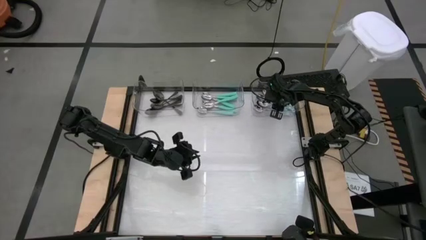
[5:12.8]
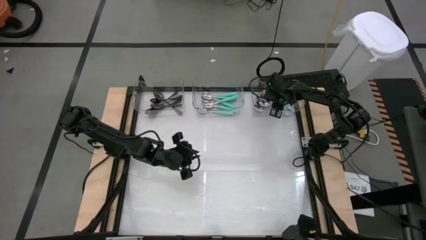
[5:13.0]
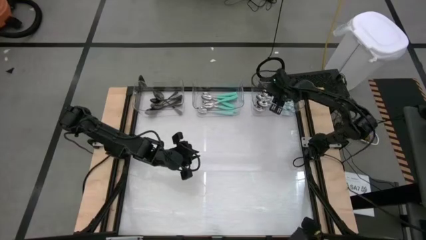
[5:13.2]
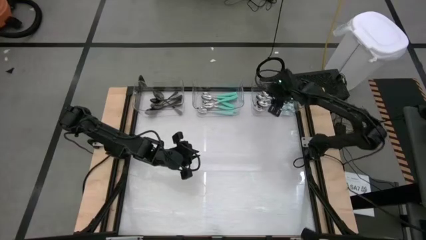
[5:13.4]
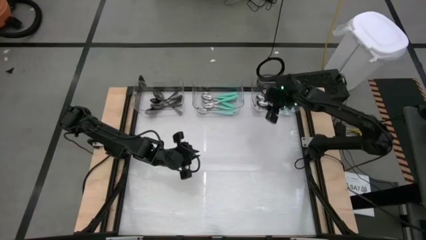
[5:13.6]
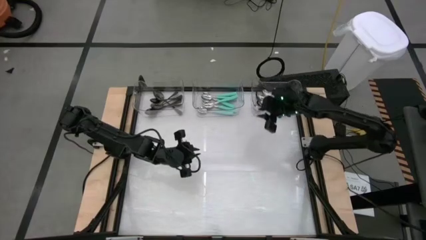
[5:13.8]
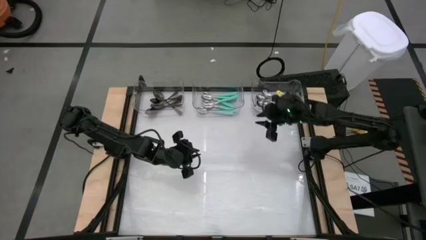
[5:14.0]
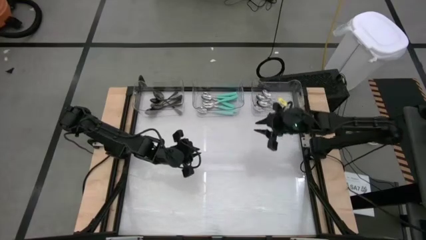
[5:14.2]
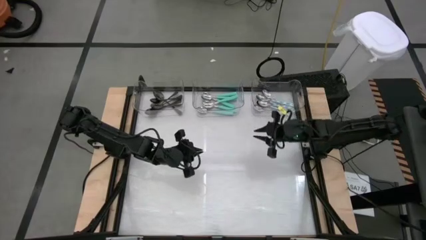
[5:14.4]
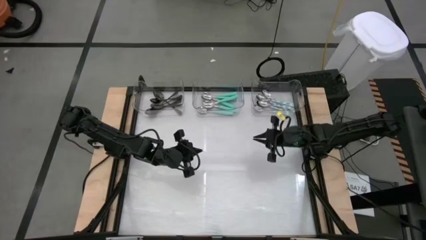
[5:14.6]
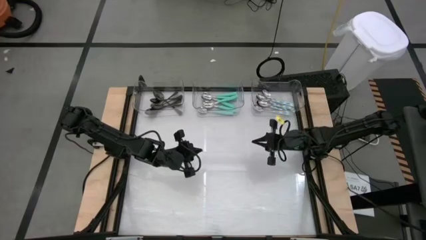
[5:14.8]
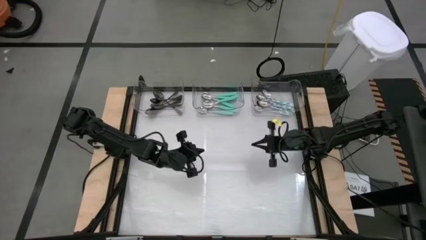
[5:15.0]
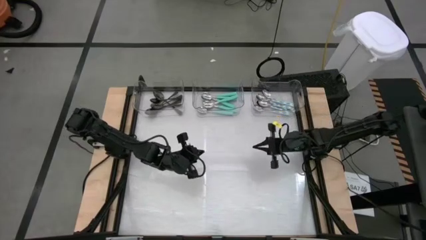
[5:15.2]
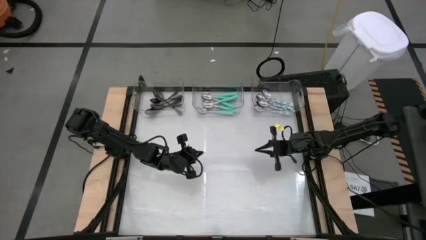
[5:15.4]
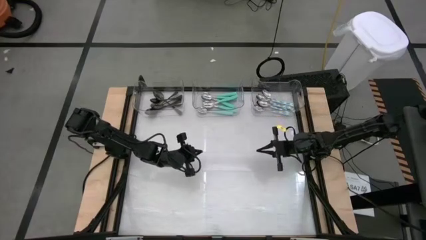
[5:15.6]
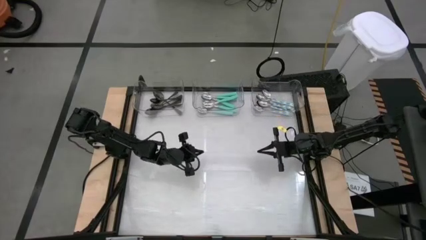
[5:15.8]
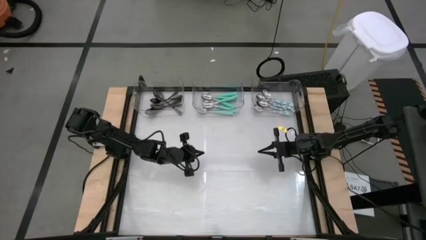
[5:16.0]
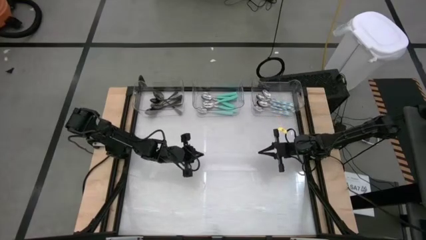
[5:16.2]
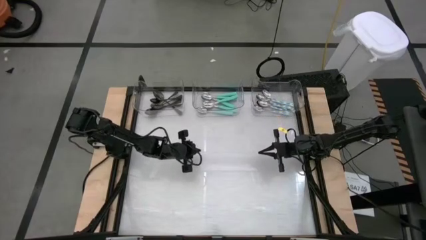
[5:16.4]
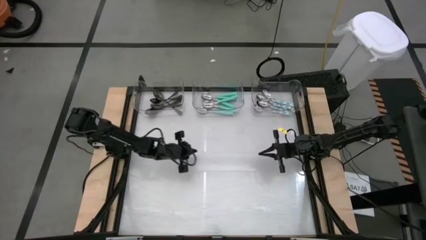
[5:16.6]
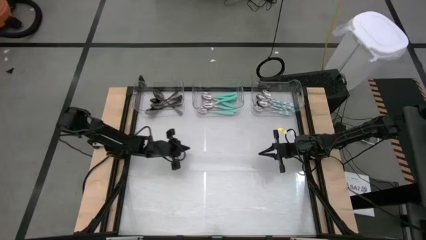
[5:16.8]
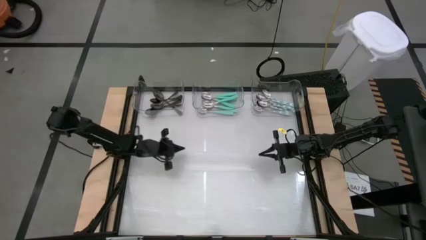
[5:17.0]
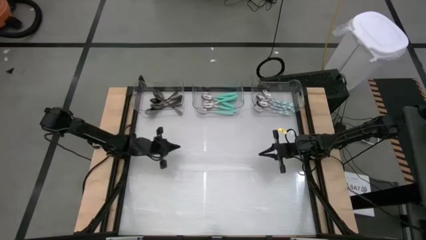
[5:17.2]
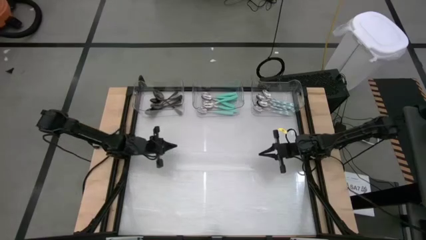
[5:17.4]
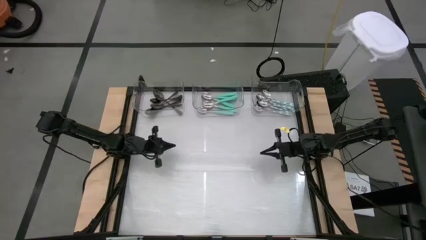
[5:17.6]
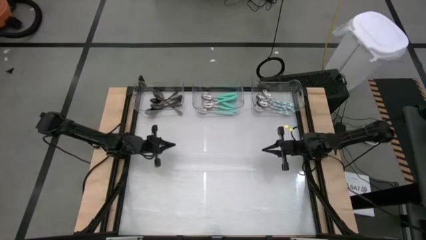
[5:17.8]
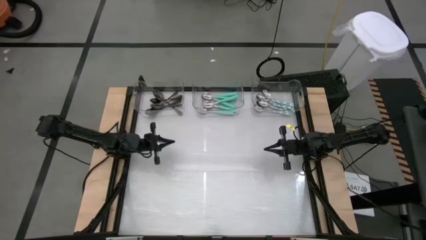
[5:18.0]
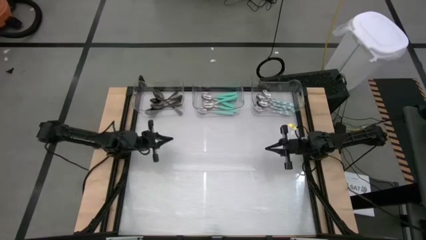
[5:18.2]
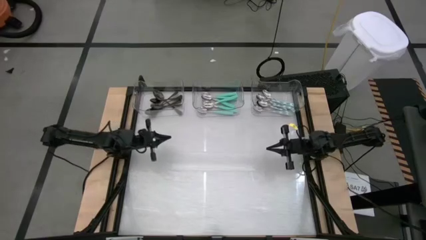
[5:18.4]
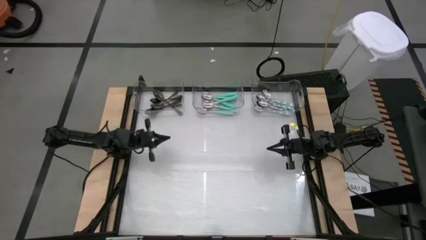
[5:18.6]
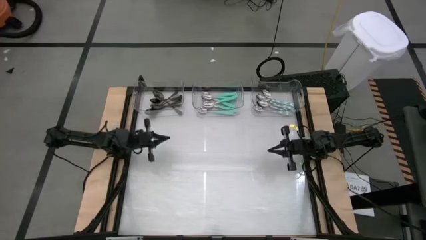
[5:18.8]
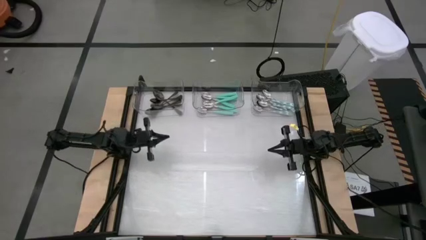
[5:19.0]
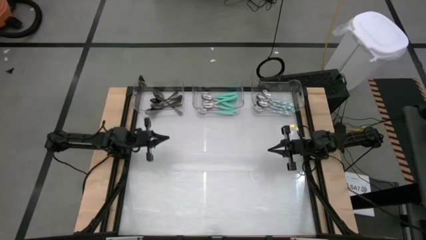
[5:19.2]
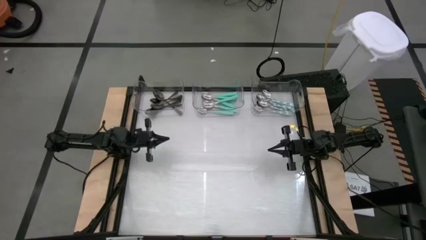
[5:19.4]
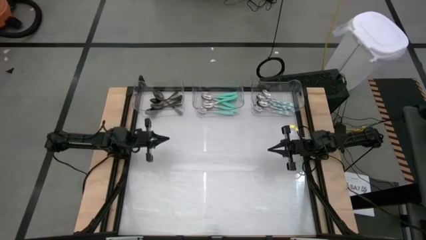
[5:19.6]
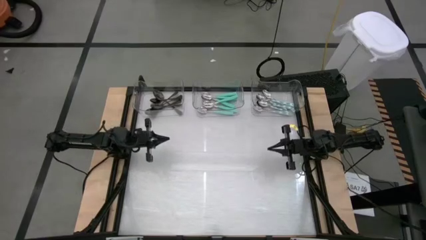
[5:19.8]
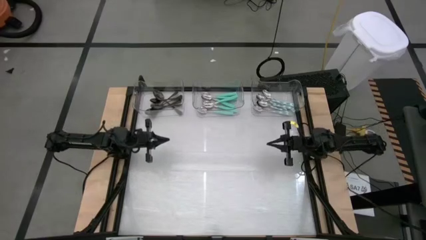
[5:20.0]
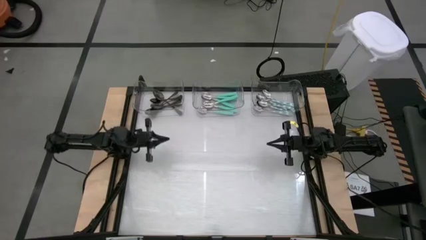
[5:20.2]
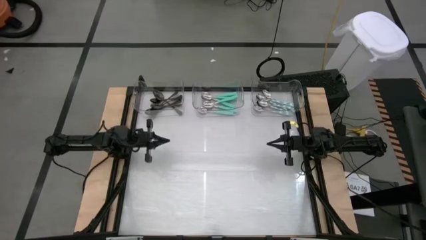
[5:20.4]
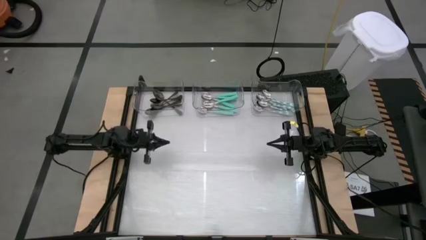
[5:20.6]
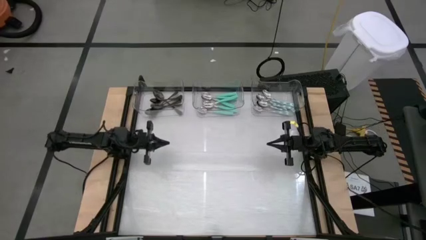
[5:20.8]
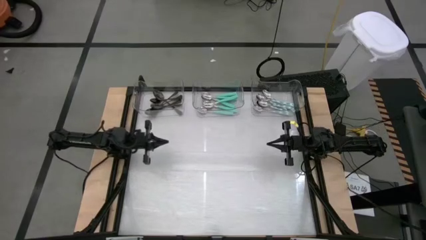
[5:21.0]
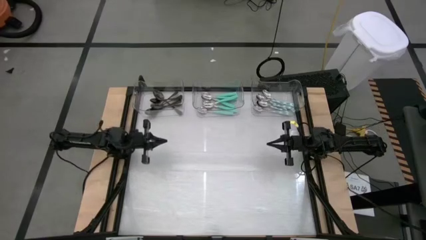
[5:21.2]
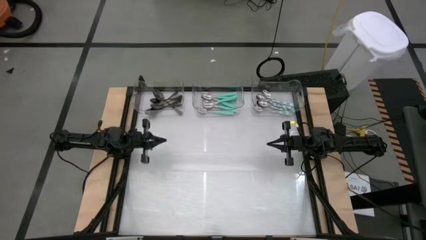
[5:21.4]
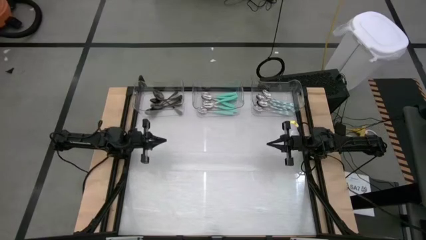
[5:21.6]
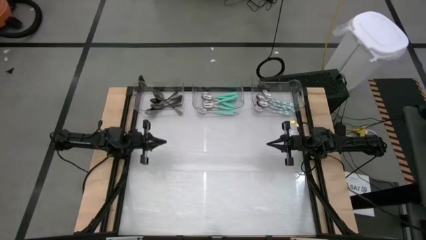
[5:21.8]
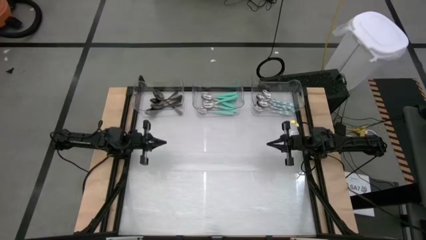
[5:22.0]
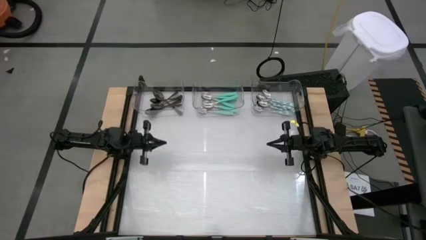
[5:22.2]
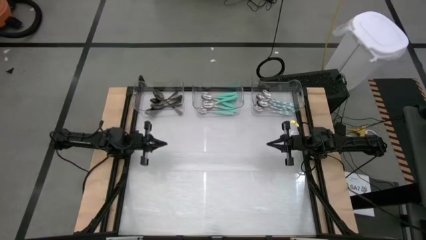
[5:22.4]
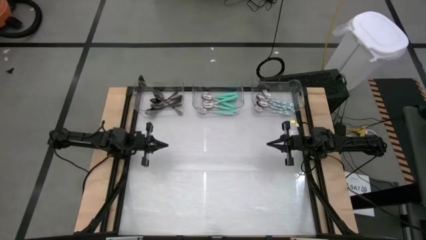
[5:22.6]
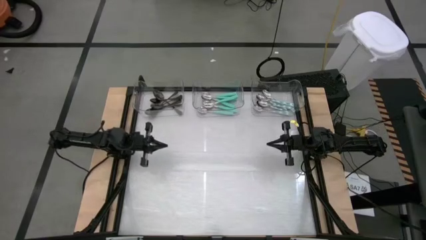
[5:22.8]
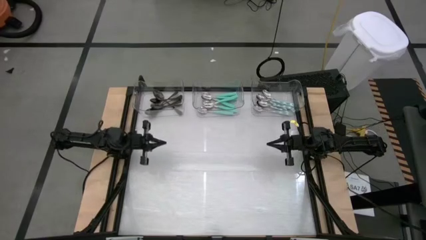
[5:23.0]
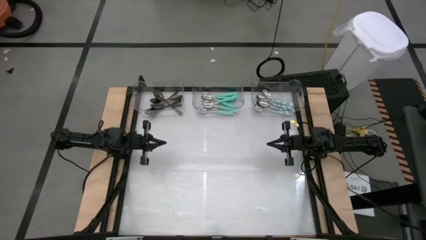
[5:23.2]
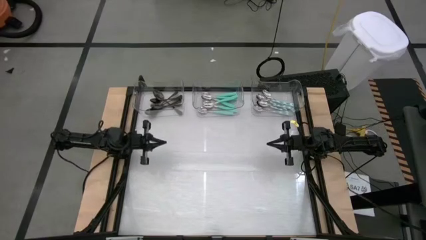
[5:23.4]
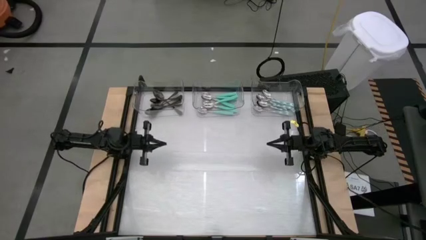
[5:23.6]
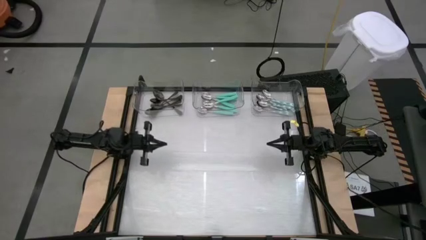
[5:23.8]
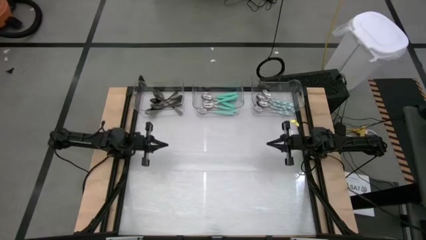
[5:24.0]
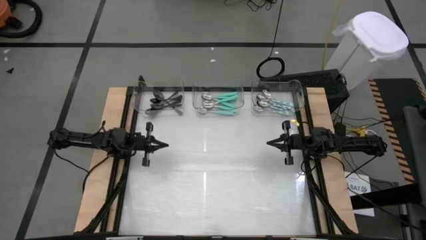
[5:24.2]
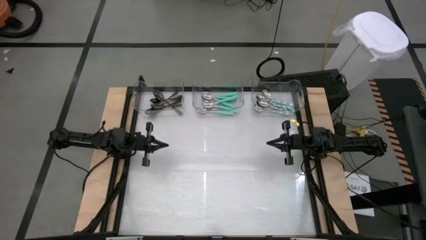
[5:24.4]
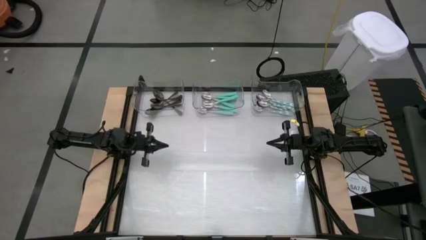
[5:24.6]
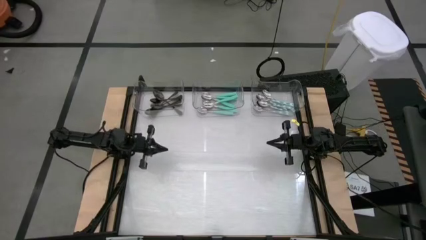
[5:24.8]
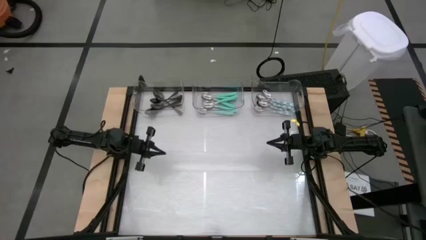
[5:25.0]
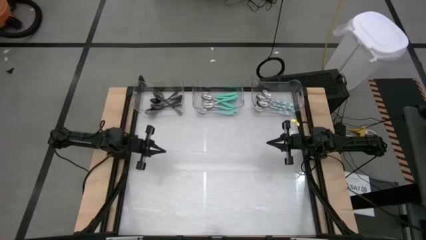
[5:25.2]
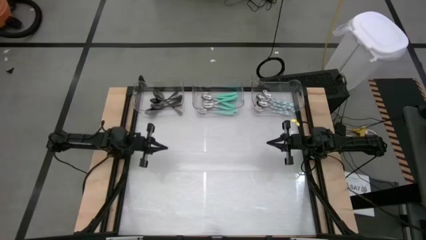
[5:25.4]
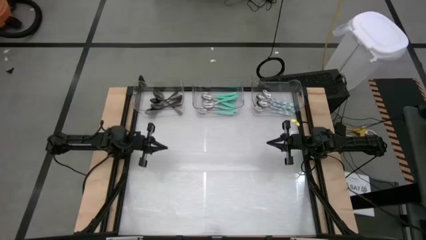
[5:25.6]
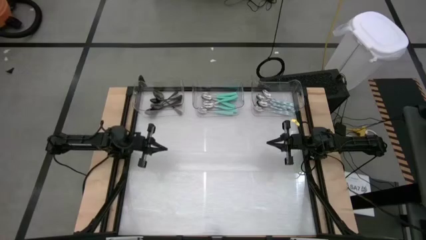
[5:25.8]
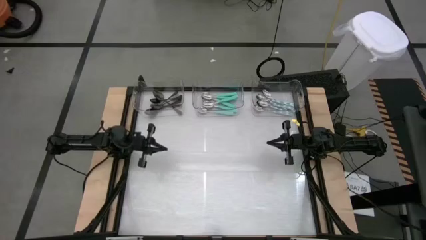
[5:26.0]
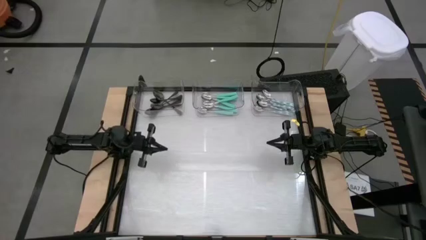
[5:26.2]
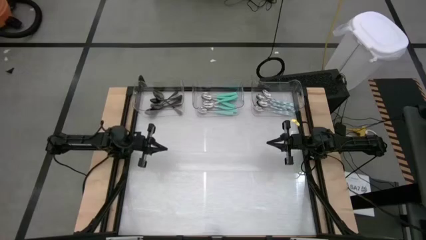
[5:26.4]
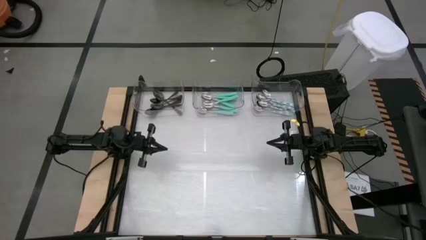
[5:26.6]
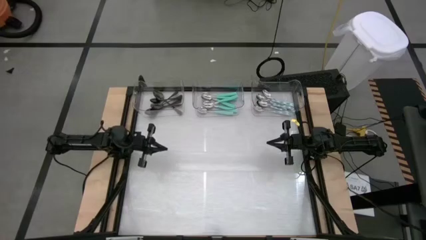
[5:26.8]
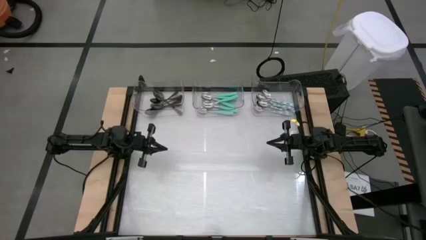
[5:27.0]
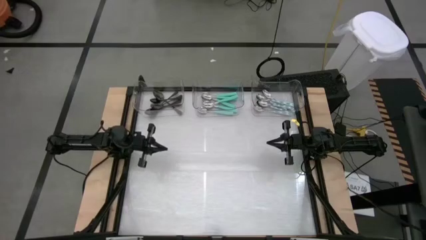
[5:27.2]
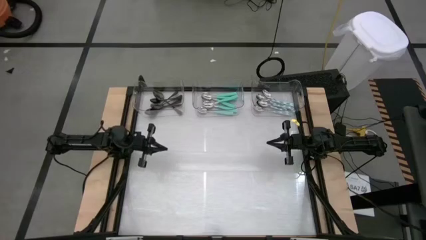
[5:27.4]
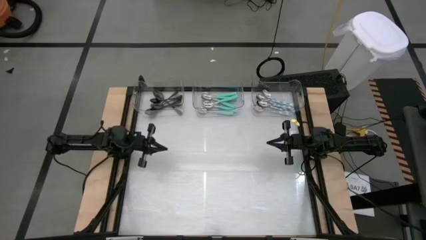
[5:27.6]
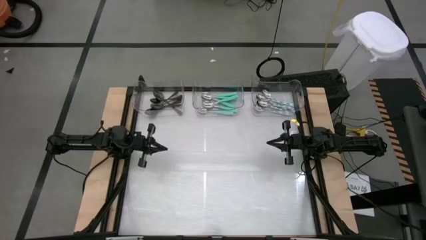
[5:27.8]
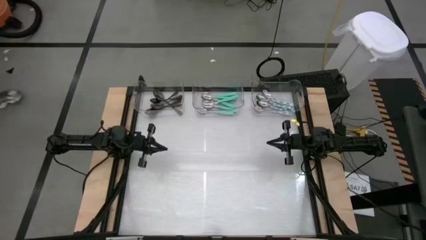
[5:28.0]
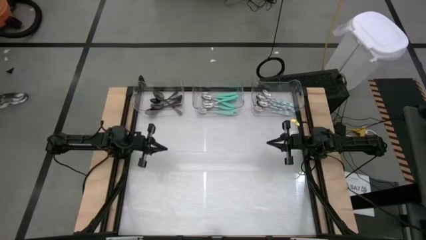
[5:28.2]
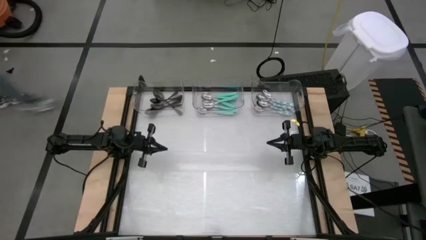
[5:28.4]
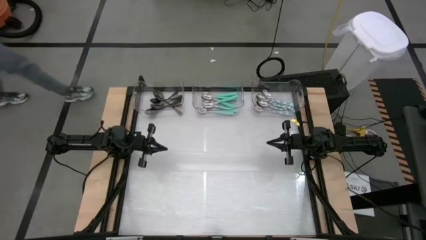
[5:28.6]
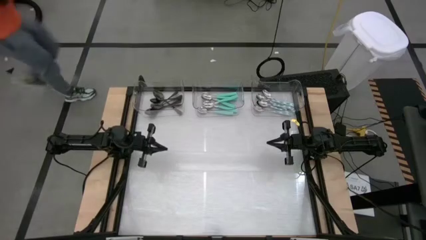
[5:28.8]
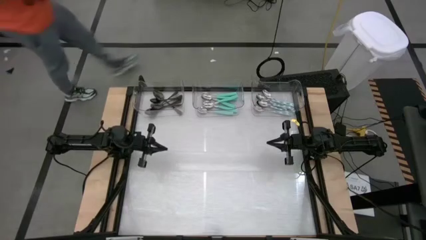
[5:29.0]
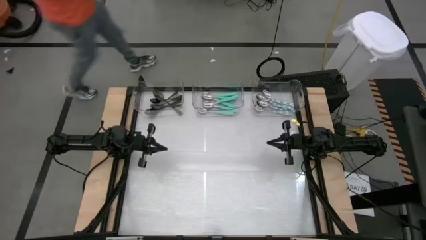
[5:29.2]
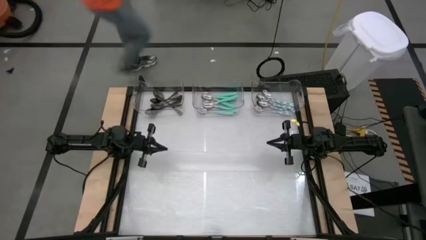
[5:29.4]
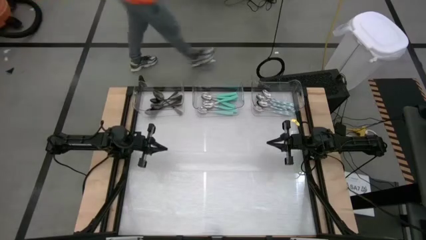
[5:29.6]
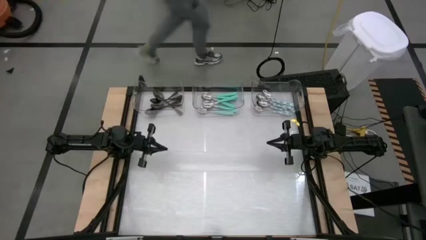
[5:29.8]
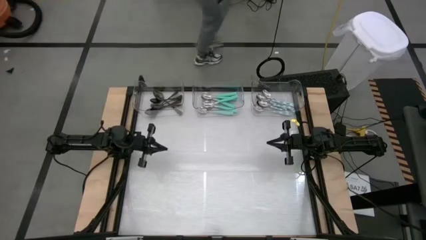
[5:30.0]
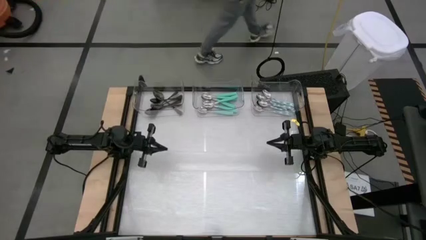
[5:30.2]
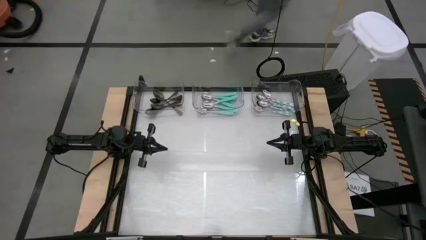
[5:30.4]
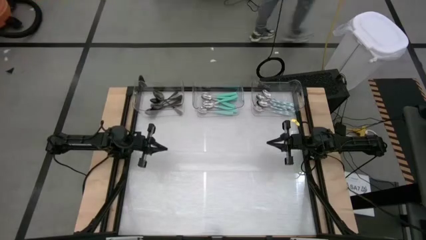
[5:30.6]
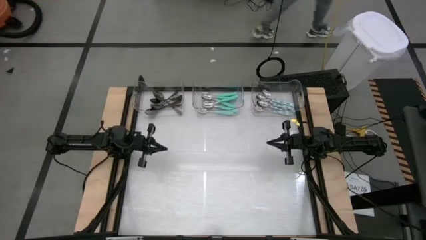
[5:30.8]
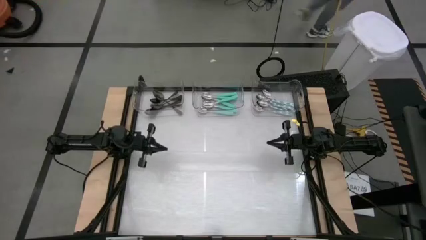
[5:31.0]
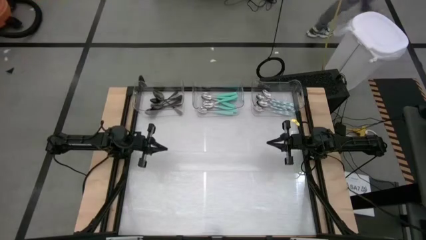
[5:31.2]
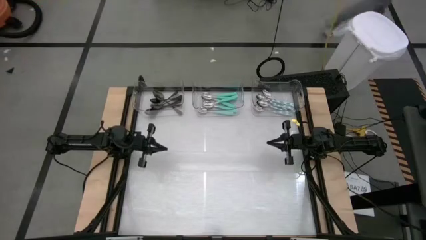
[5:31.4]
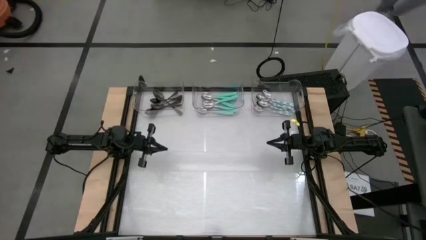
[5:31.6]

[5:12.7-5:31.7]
Task: Sort silverware by color (type)
Return to Home Position
